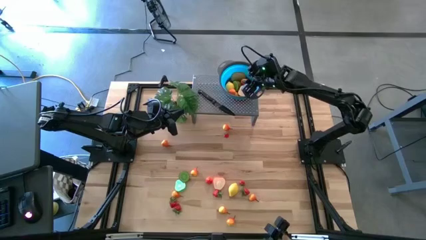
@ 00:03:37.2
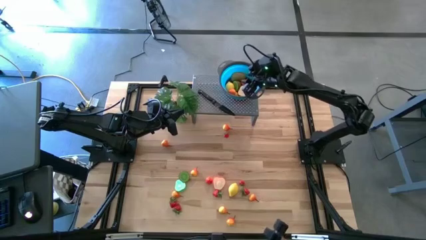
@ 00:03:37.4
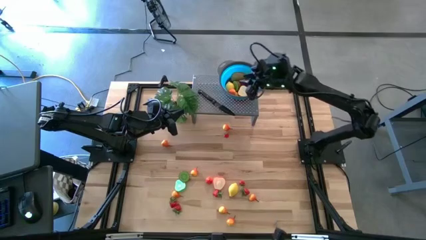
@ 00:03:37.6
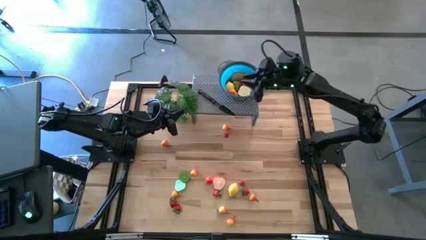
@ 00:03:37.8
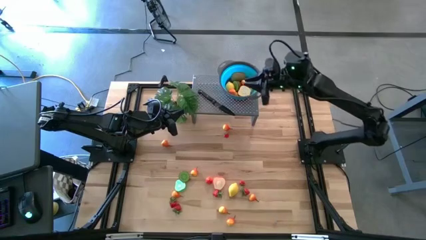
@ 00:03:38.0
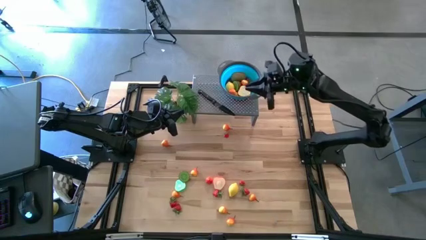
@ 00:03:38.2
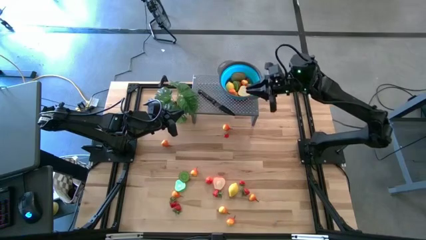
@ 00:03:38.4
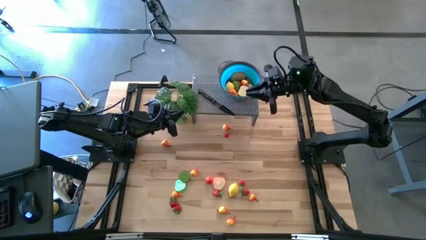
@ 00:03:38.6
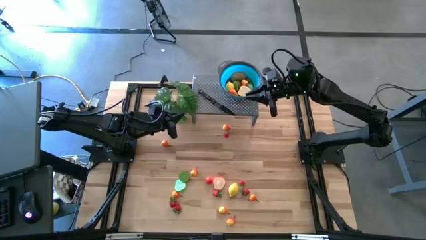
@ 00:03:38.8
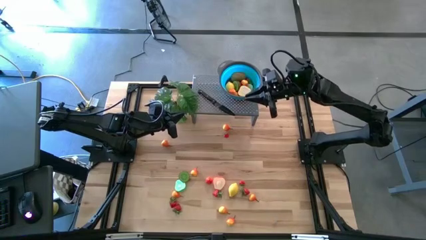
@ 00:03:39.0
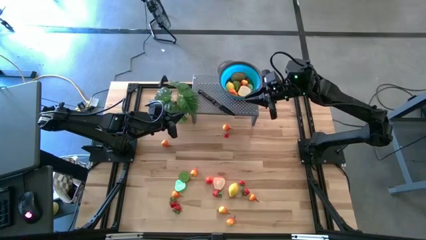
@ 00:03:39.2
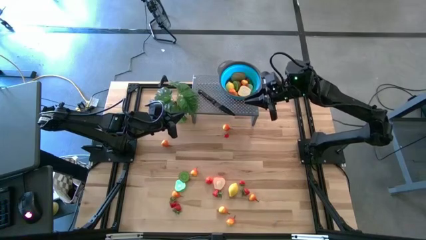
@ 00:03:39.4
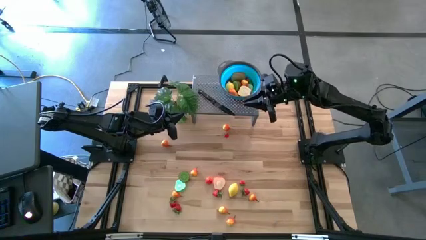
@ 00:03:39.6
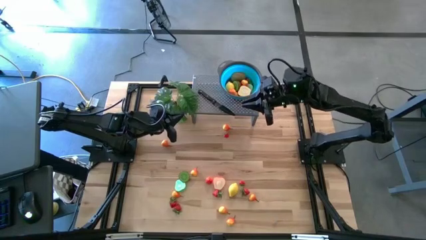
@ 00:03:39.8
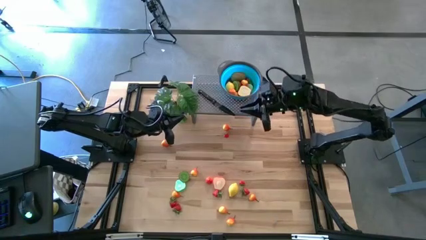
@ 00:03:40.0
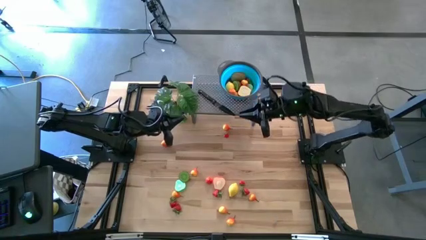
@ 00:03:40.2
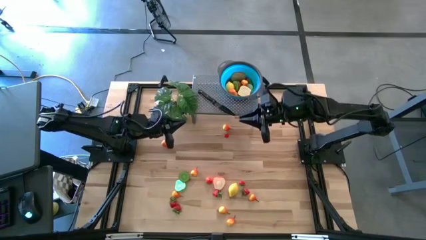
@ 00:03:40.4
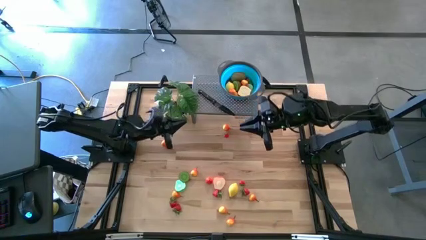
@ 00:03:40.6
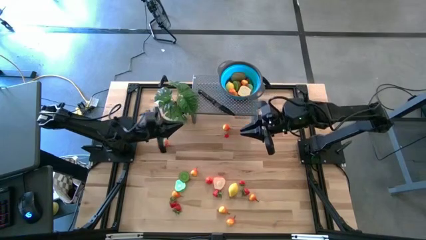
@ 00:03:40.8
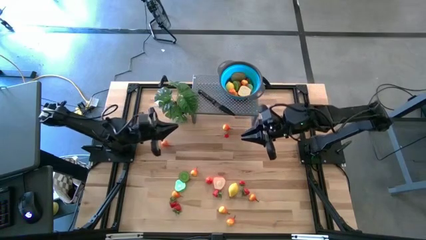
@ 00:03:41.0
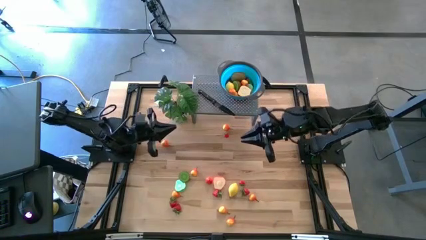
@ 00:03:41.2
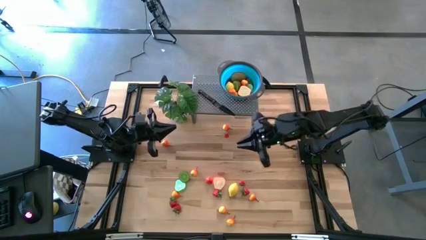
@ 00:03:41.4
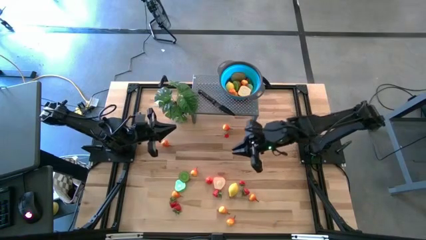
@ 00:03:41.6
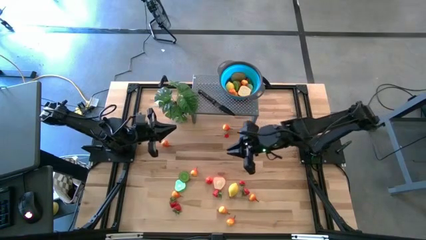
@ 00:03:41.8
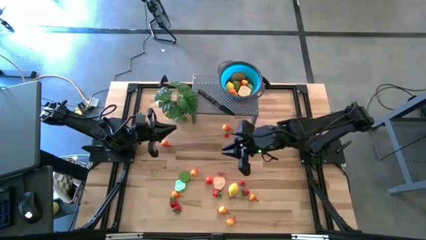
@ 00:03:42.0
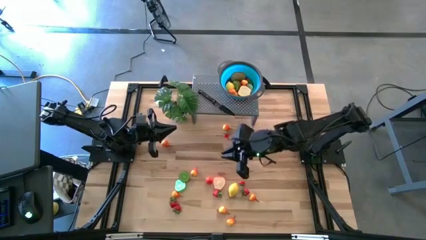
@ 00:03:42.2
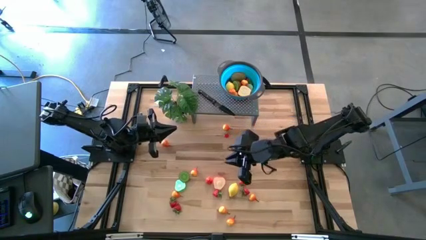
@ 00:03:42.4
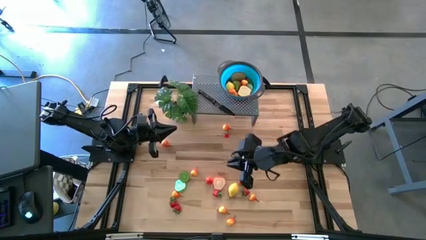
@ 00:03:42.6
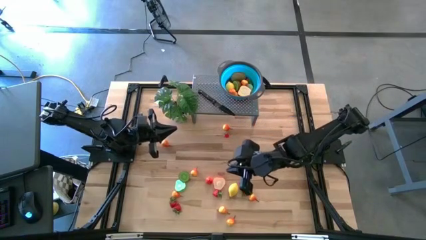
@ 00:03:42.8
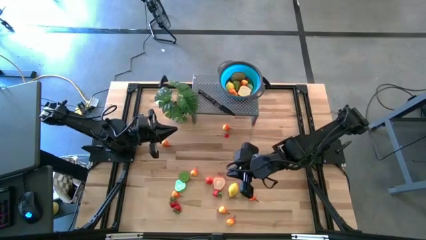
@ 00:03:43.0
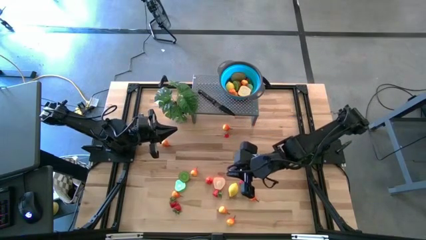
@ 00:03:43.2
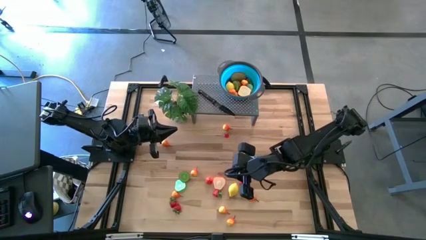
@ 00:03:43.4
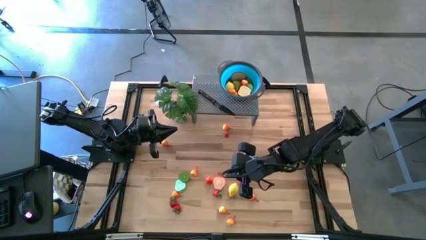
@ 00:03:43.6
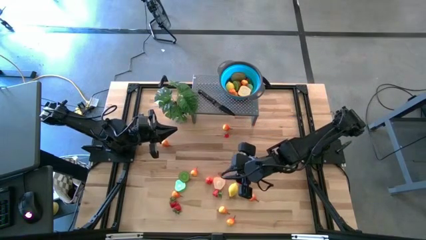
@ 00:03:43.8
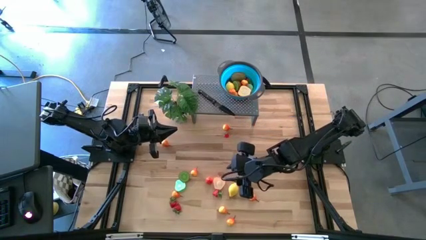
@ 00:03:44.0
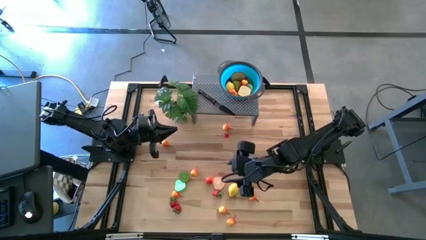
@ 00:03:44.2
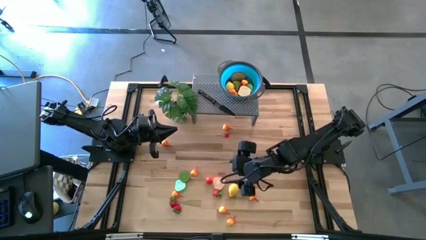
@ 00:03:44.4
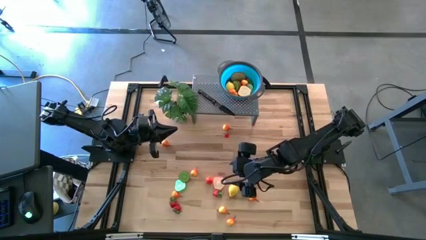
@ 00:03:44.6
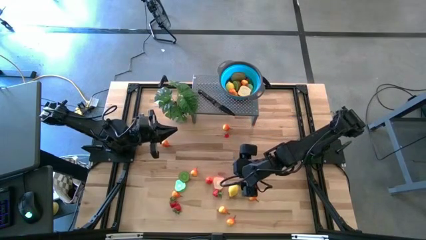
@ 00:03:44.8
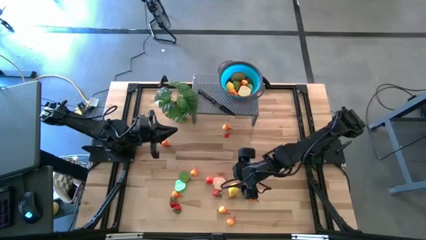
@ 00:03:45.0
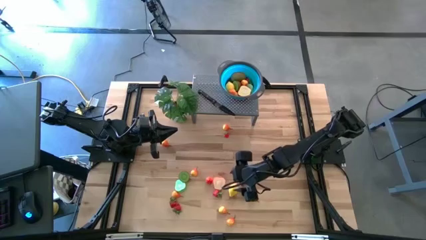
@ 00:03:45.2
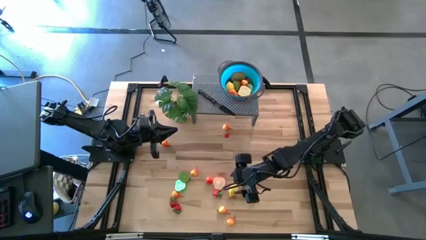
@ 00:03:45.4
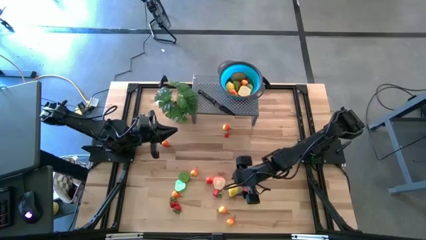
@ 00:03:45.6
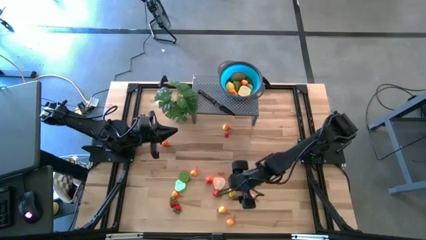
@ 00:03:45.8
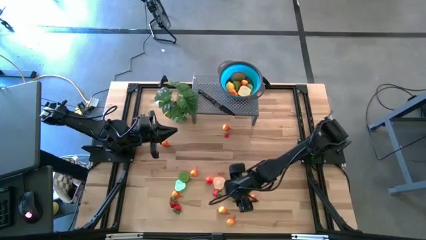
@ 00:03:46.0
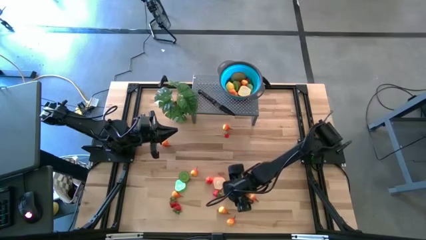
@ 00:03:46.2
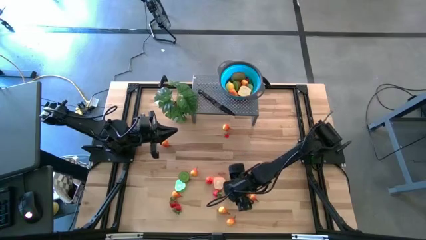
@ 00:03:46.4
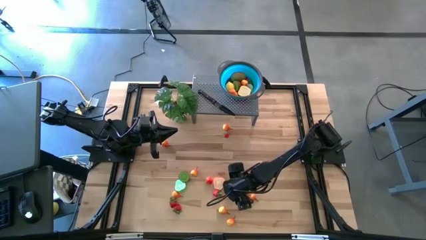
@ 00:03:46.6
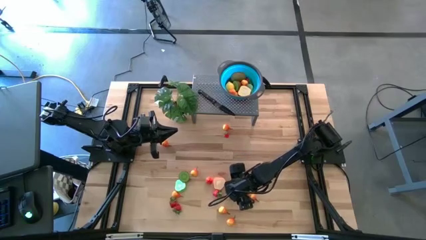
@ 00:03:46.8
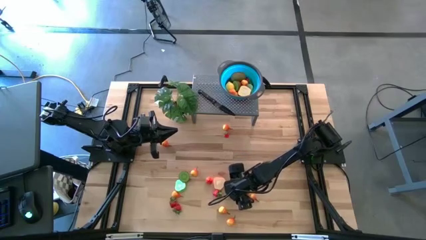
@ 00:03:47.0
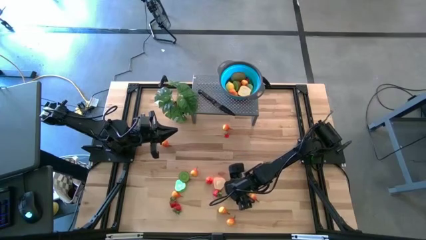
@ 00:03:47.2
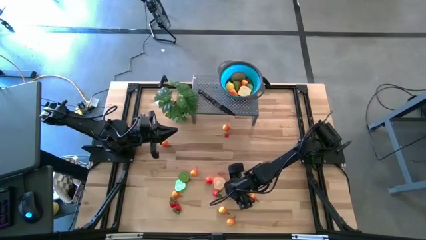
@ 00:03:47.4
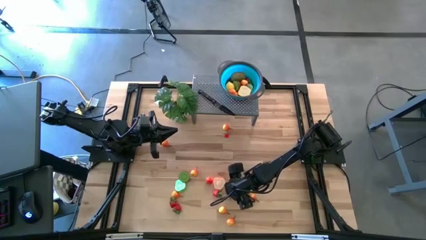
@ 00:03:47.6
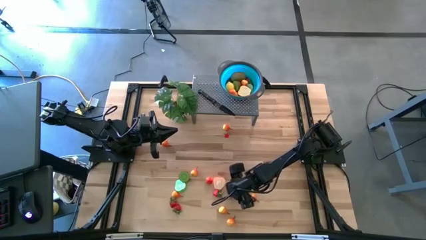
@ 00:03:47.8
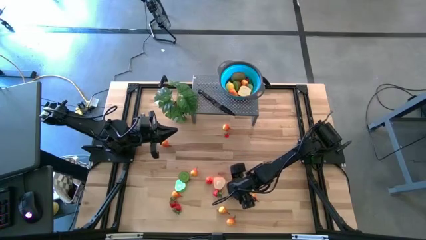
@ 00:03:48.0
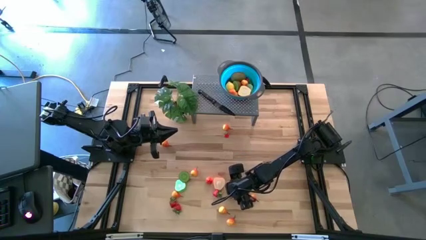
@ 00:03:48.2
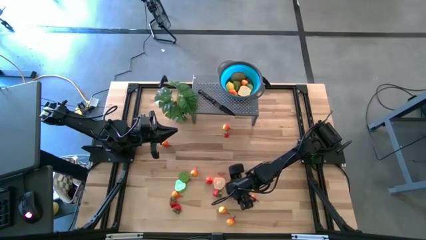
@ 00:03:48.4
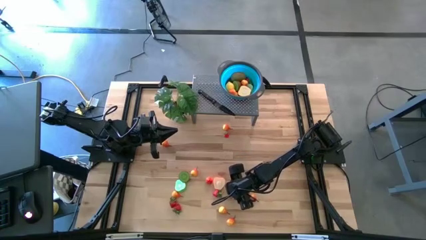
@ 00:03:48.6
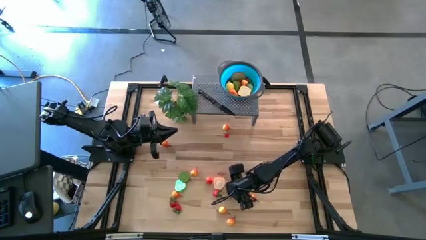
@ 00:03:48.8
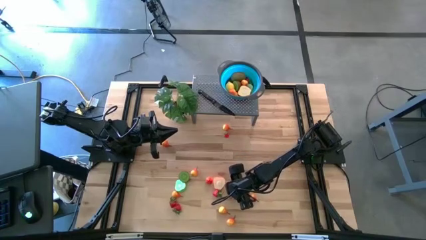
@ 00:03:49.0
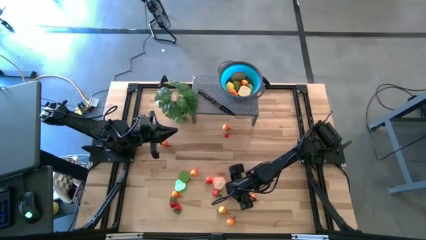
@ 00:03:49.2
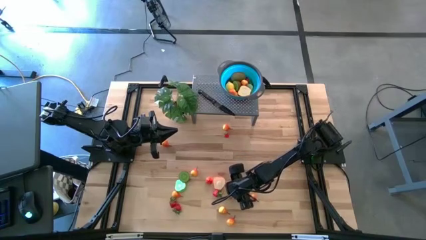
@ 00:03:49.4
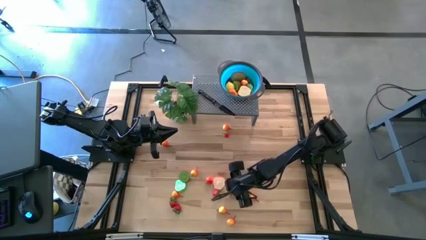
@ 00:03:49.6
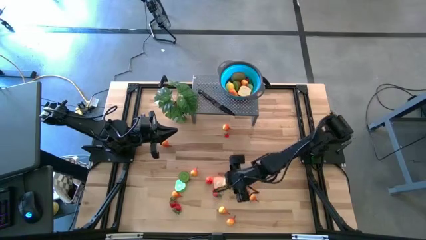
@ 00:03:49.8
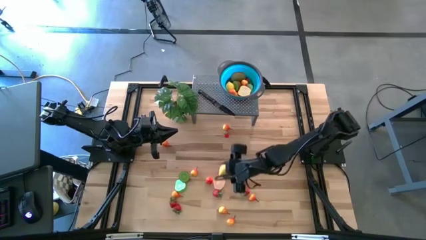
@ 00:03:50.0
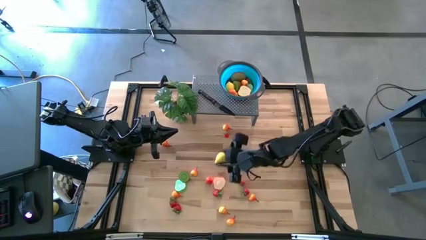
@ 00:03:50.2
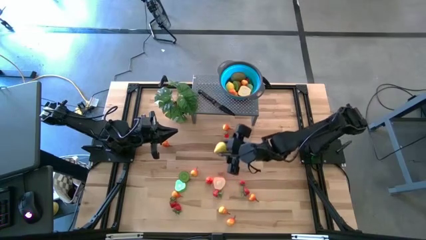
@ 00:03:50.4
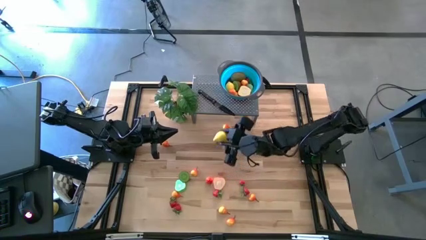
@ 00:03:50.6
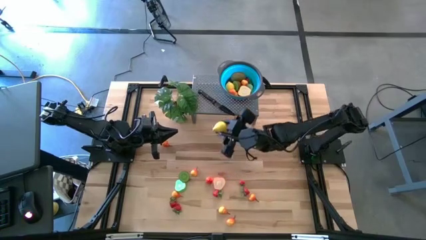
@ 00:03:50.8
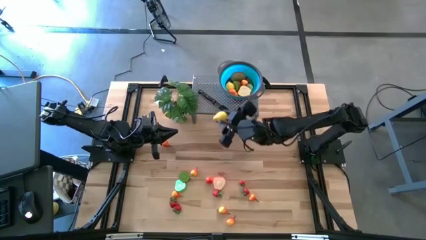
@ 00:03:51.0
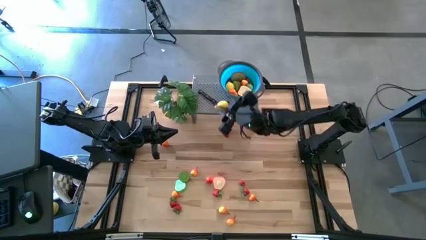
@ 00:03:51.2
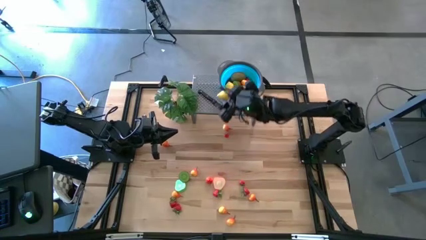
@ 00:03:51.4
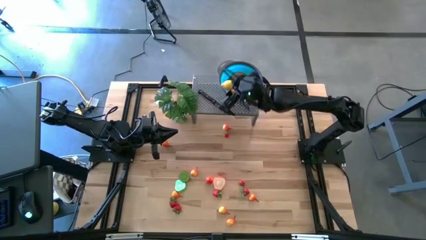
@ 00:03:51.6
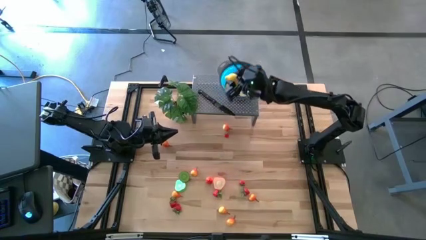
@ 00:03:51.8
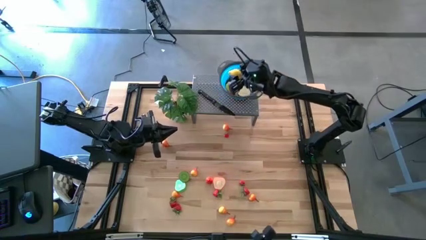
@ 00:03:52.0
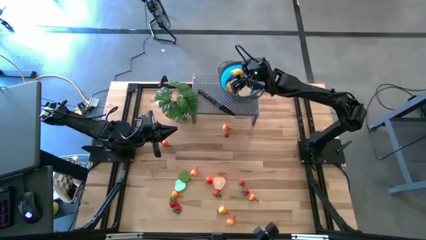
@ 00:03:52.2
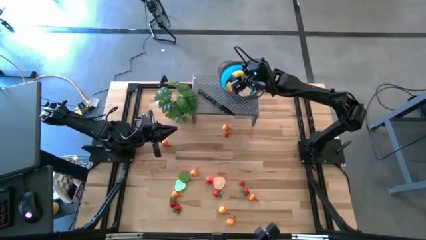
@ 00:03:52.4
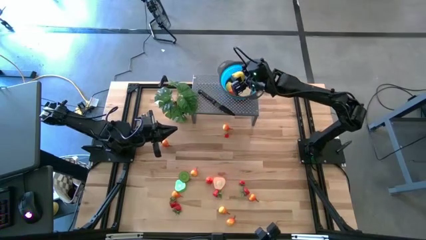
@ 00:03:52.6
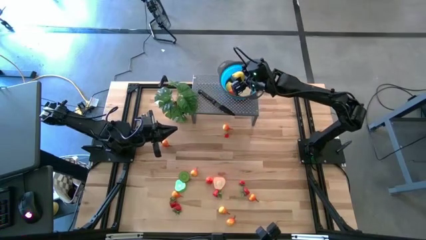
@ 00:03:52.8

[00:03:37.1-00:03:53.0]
Task: Pick & Place Fruit
Put the yellow lemon in the blue bowl on the shelf
